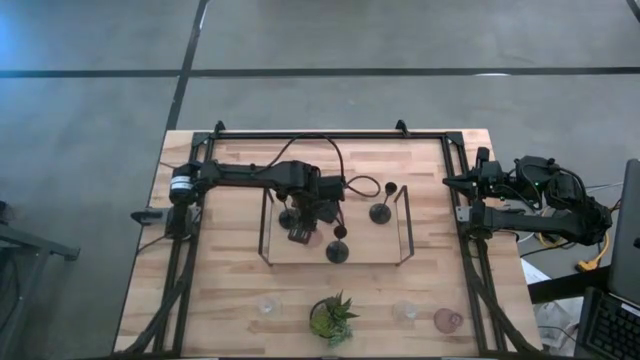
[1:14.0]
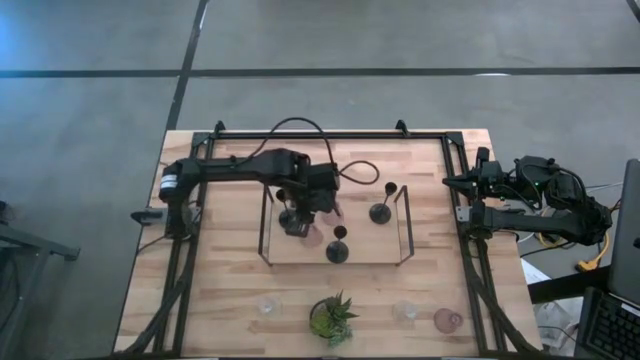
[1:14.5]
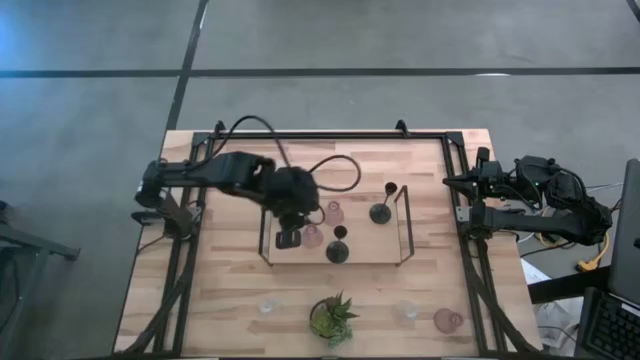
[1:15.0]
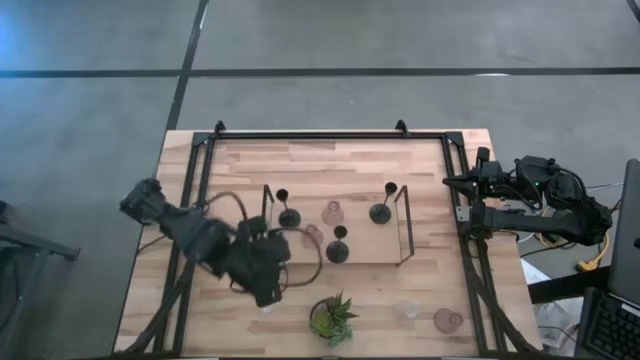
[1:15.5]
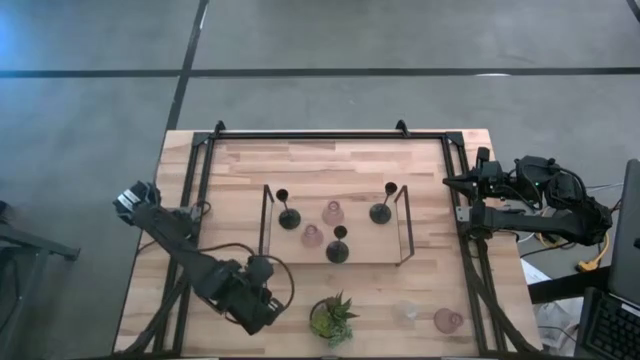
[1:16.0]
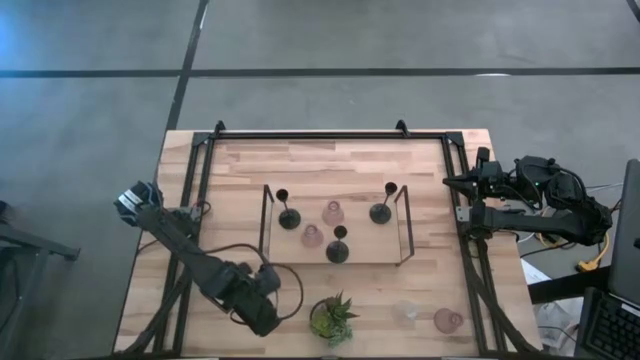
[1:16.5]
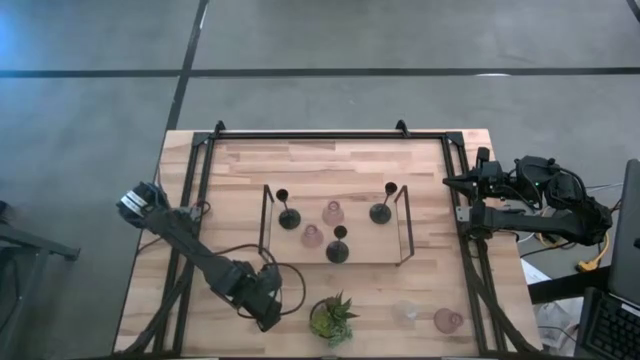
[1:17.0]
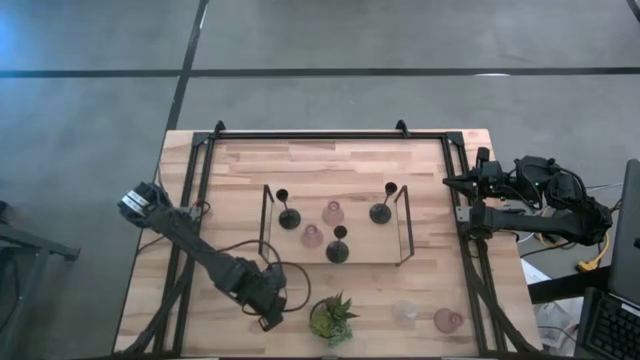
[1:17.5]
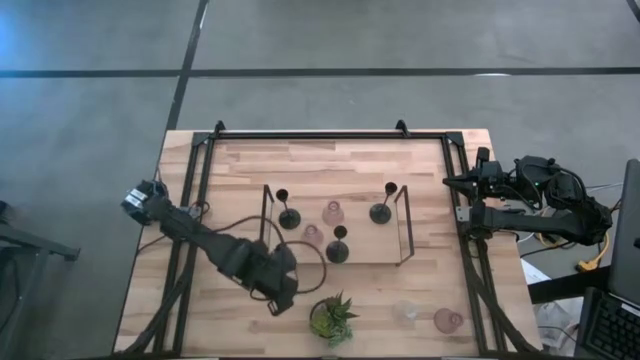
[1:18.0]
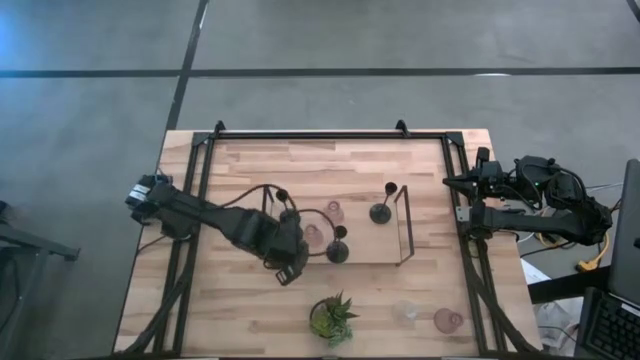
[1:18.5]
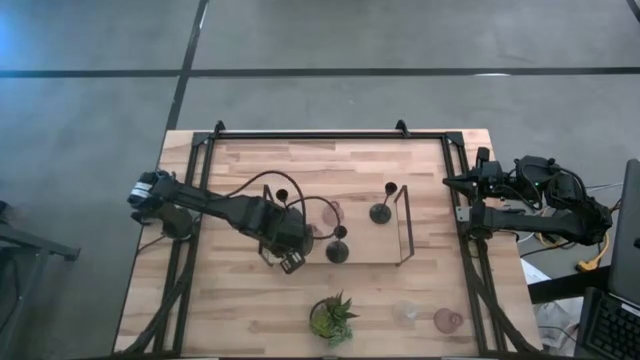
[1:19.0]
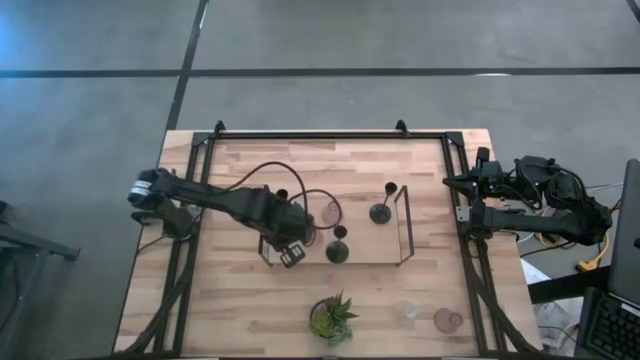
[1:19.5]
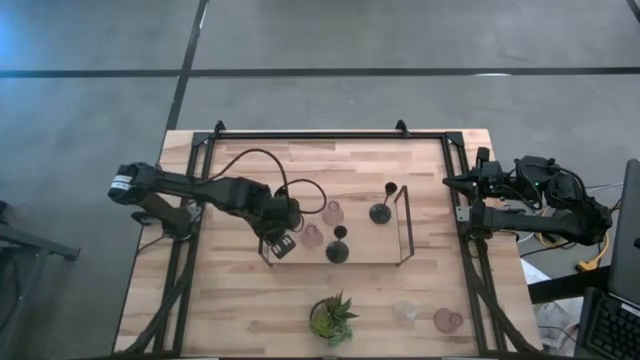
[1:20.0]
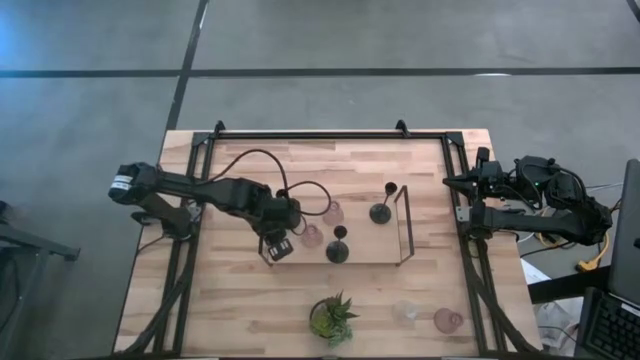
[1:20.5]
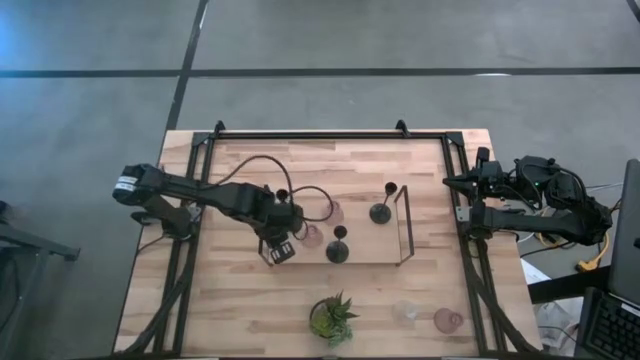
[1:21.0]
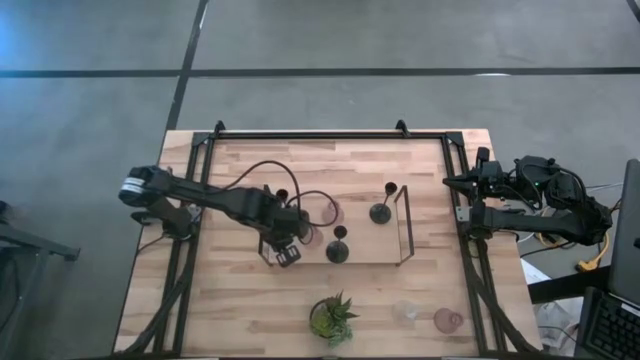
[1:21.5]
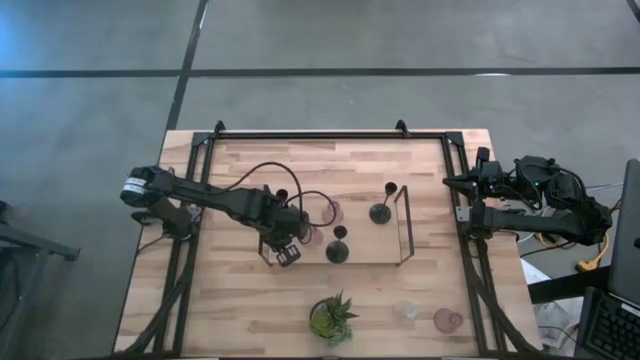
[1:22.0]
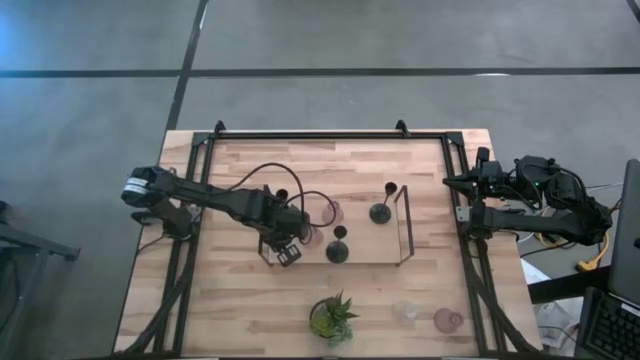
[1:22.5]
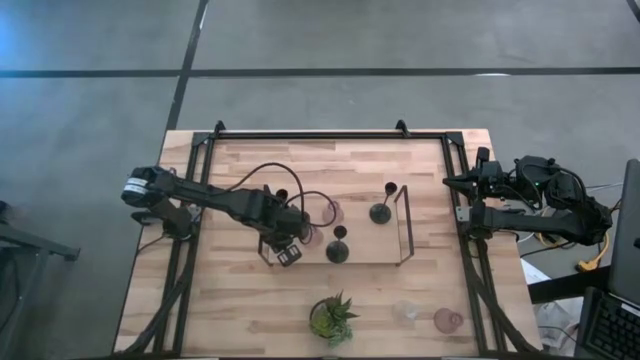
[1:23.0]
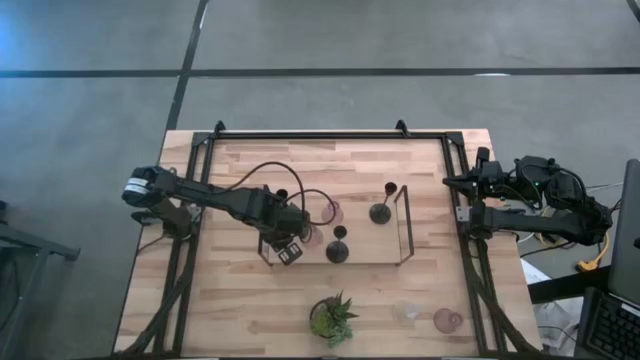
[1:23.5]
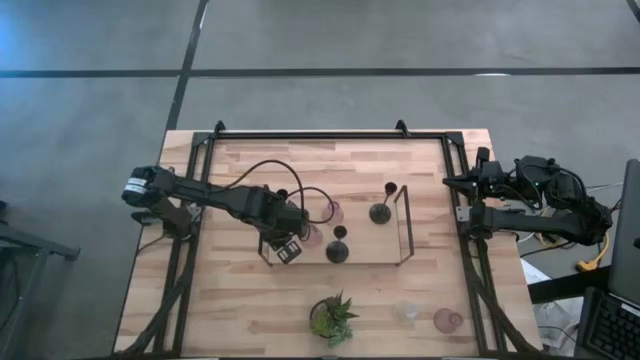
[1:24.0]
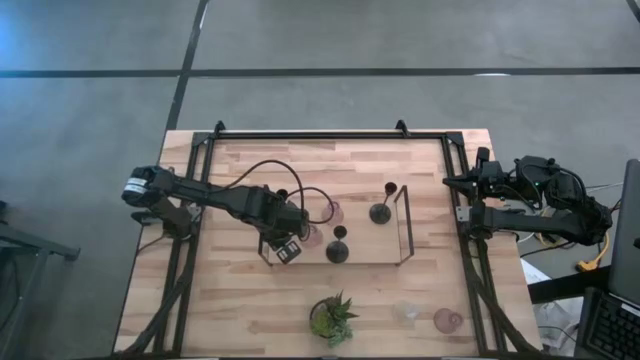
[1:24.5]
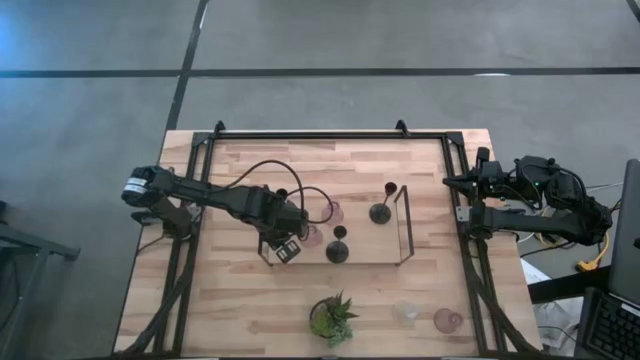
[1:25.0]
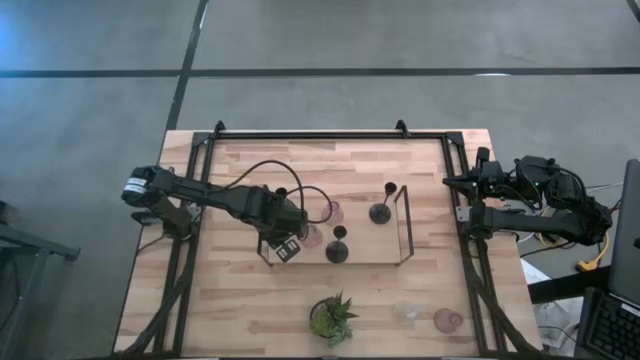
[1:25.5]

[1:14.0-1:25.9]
Task: Pick & Place candle stick holders
Put the left transparent glass candle holder on the shelf

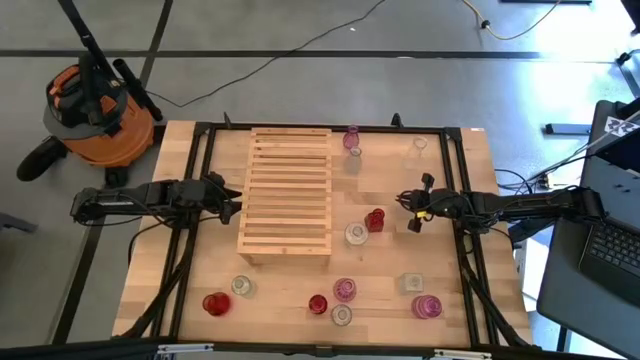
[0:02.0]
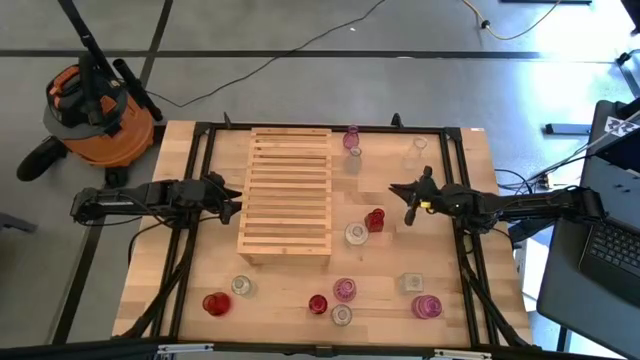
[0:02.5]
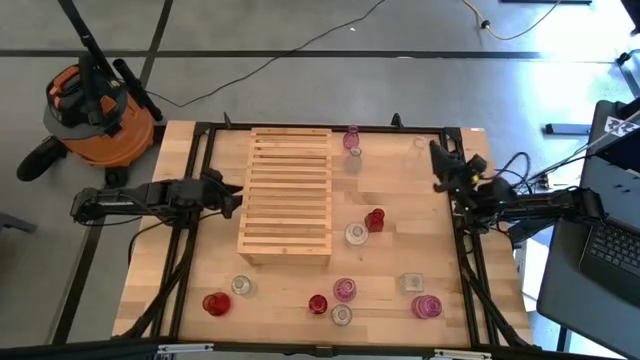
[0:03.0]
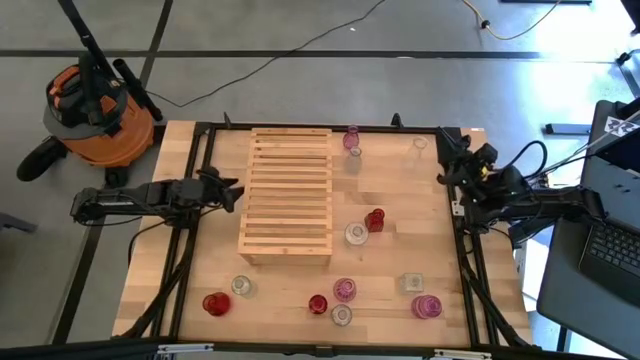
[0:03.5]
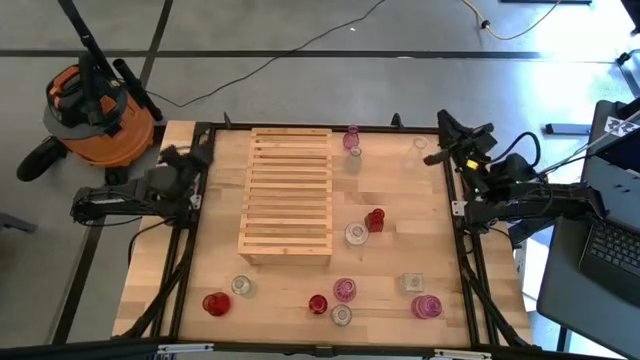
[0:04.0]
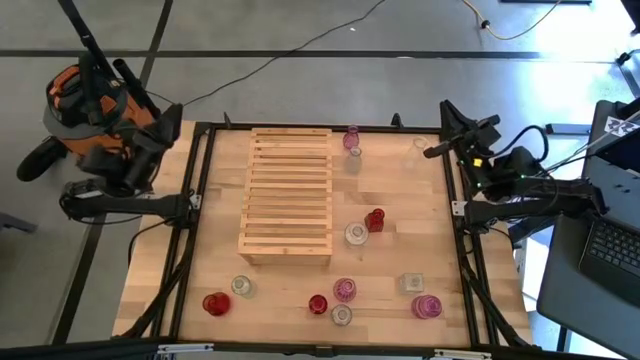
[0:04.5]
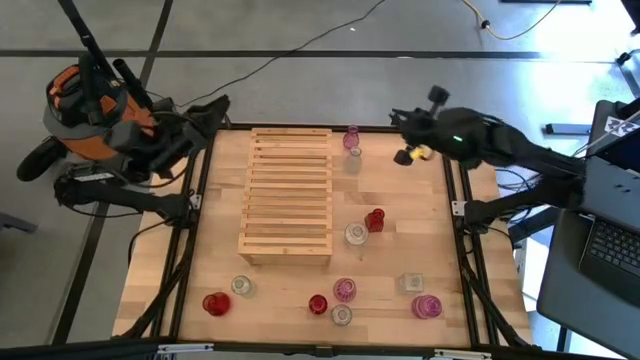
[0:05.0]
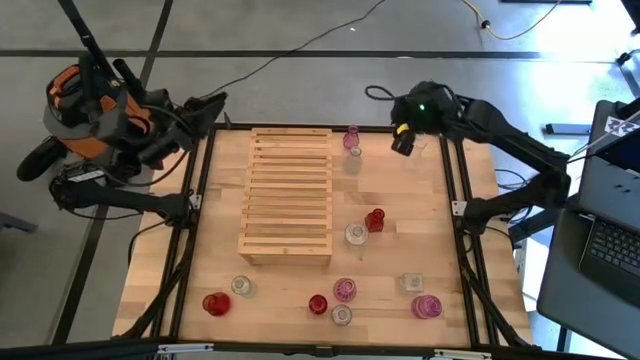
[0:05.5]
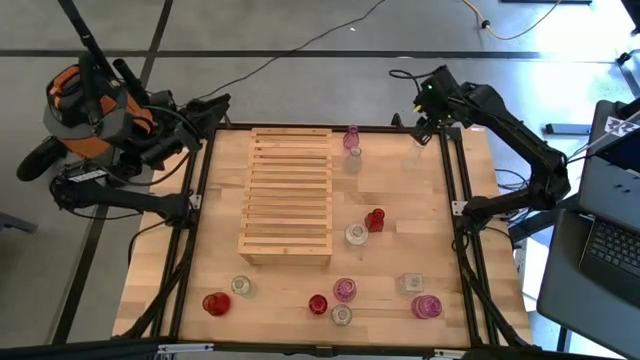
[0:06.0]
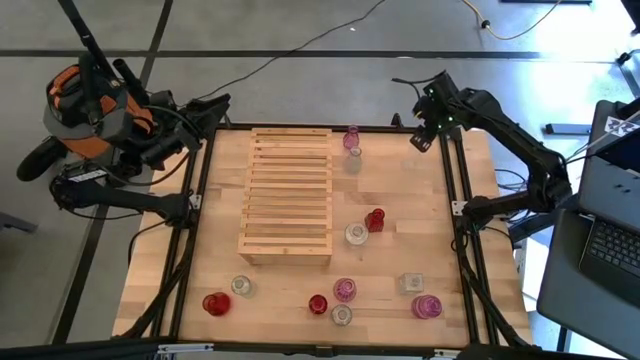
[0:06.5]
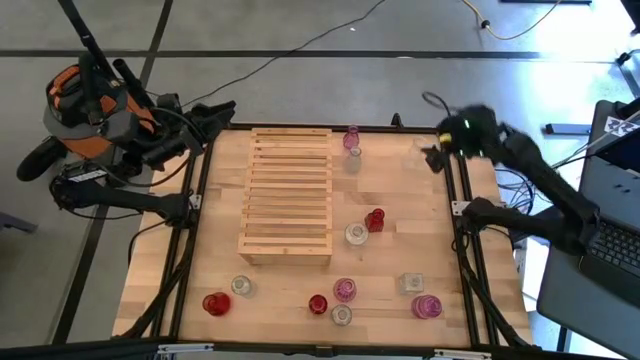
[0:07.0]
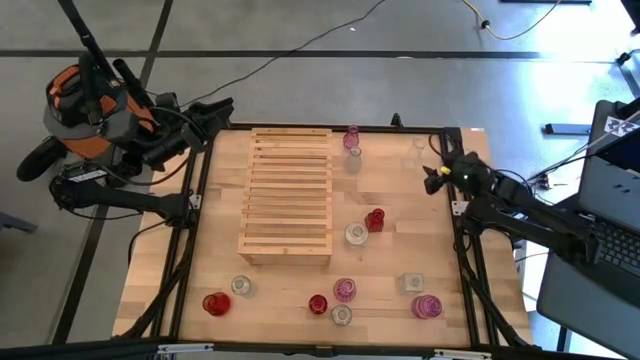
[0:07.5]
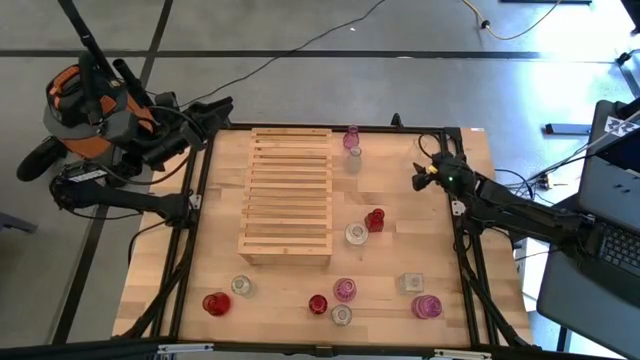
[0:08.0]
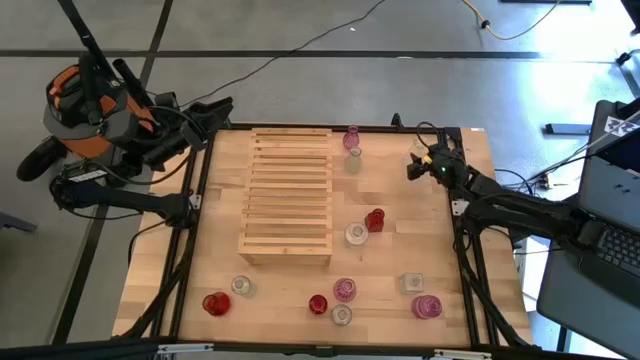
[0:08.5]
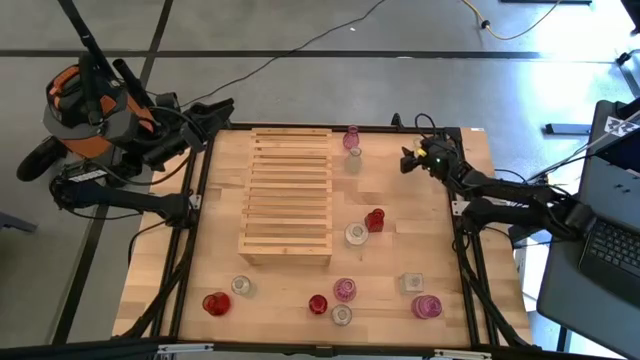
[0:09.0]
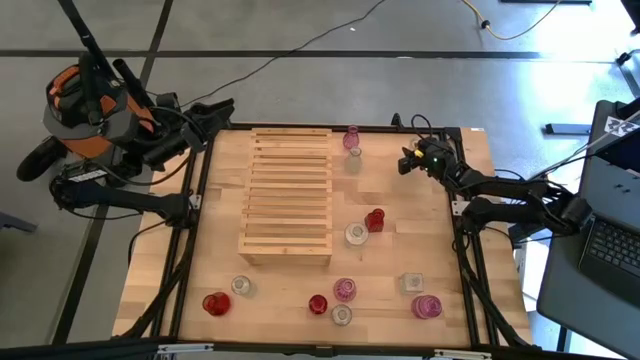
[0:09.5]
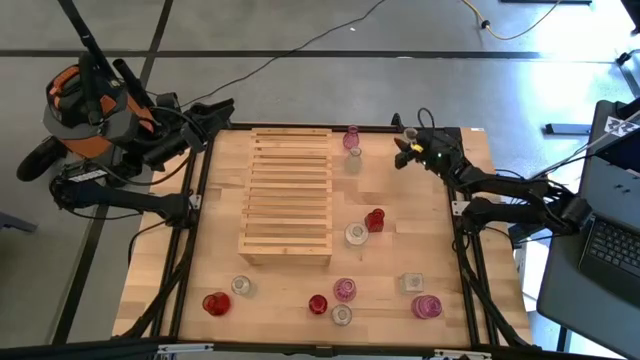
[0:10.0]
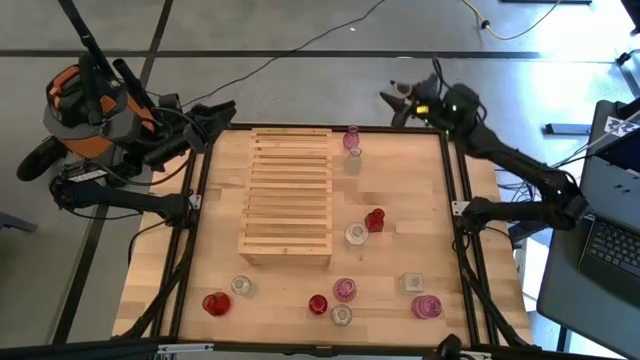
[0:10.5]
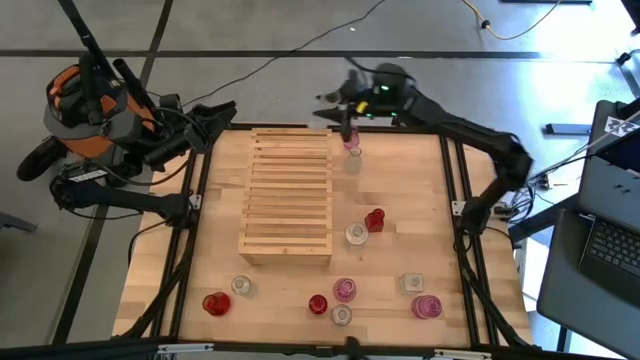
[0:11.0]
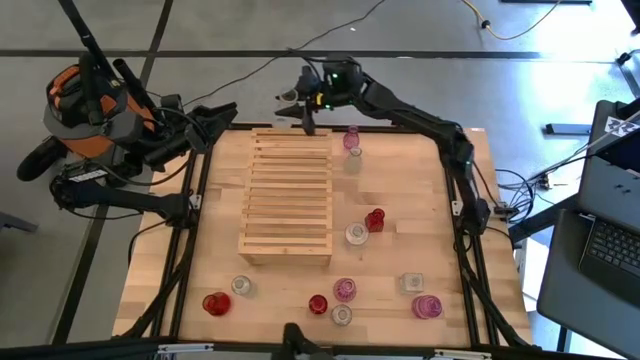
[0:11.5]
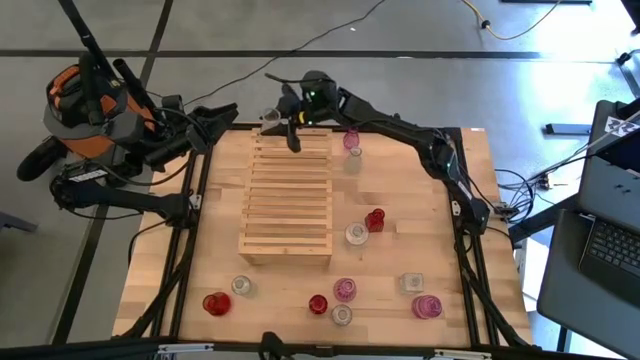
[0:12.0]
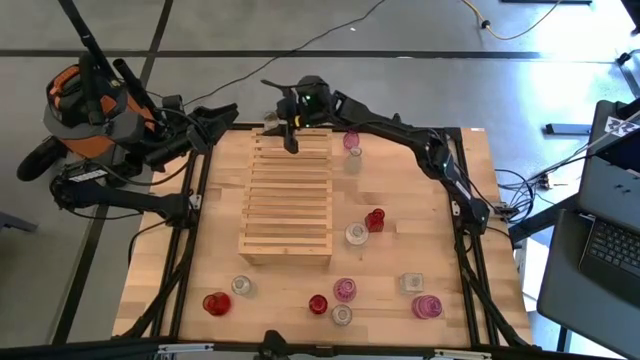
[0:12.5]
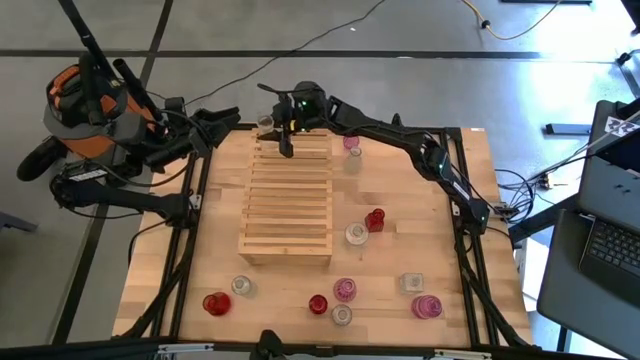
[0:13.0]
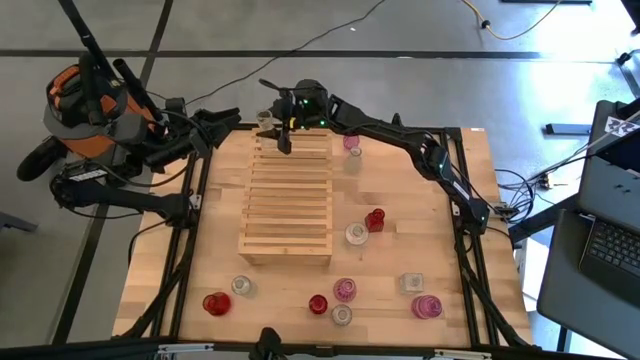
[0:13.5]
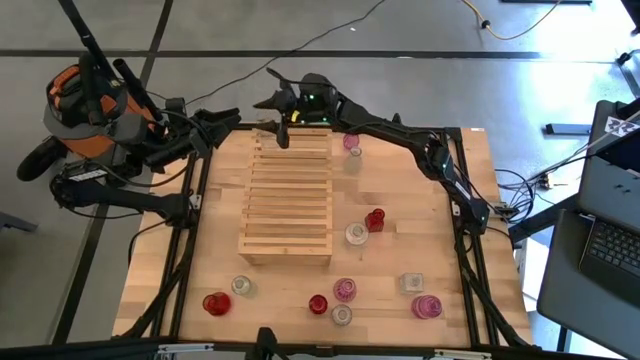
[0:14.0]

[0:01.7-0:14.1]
Task: sort vases onto shelf
Put the transparent vase on the shelf
